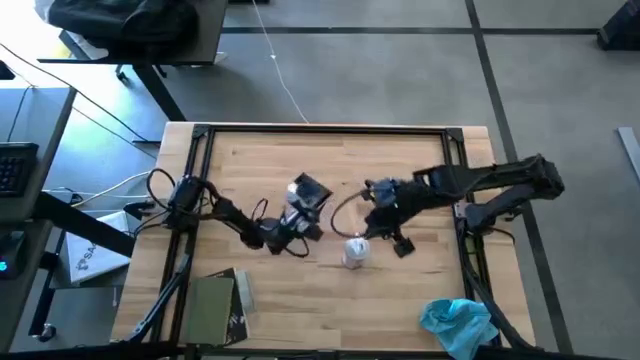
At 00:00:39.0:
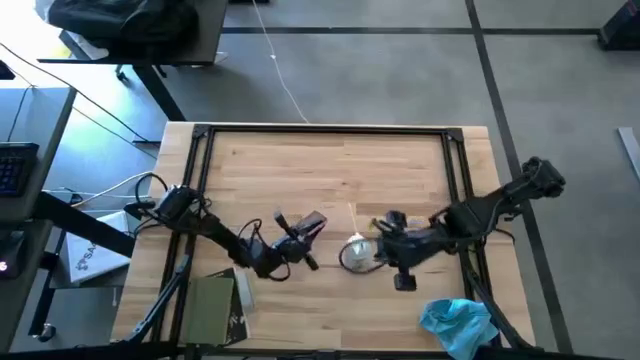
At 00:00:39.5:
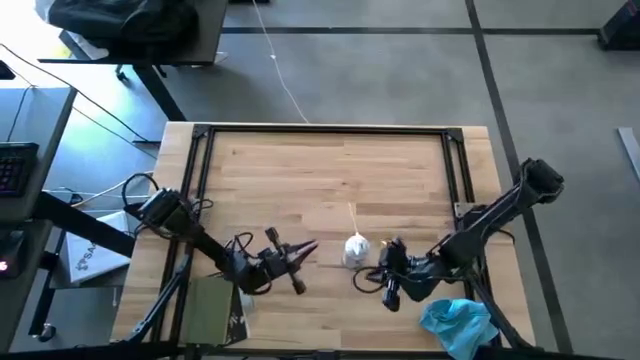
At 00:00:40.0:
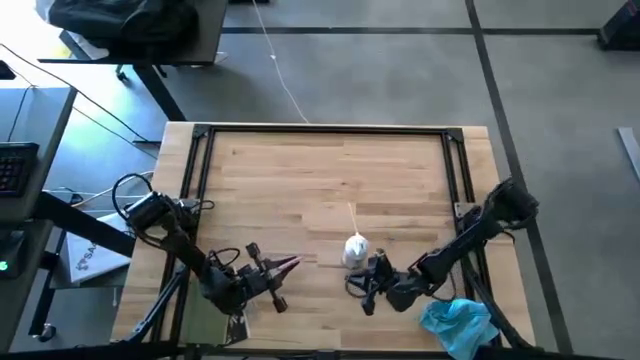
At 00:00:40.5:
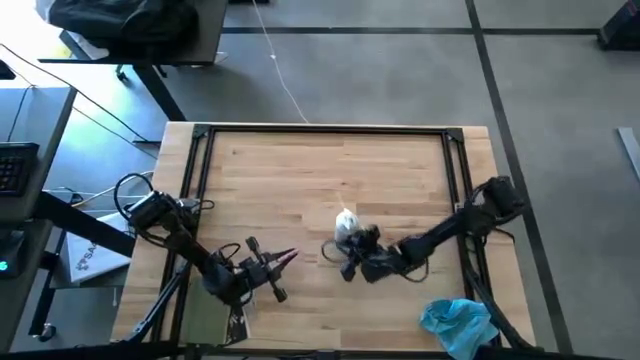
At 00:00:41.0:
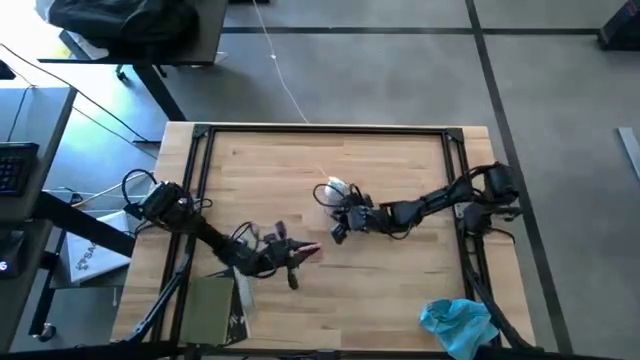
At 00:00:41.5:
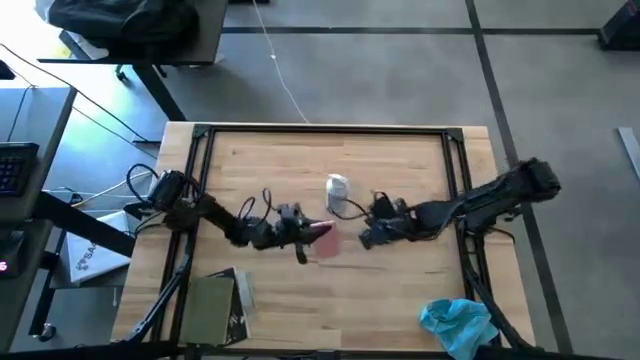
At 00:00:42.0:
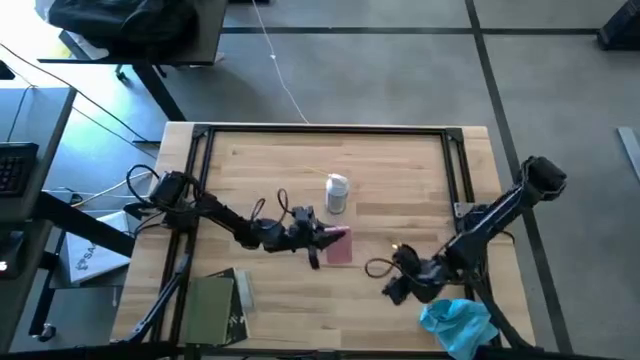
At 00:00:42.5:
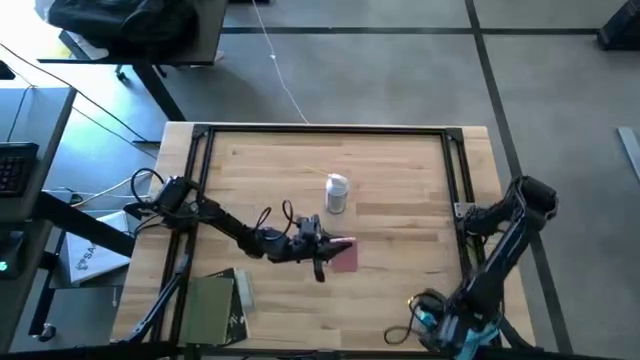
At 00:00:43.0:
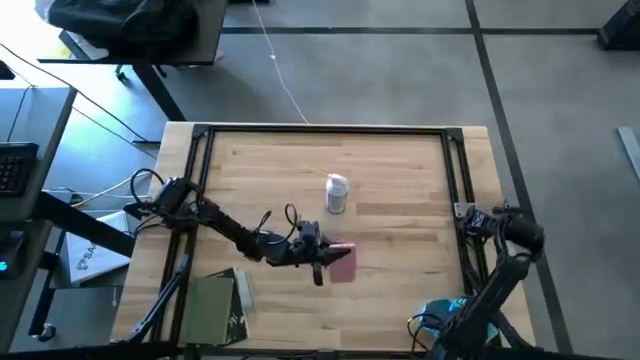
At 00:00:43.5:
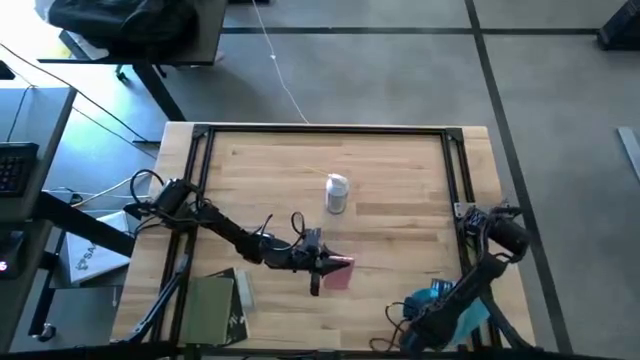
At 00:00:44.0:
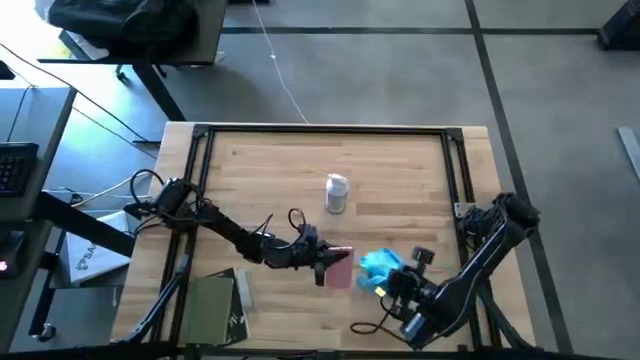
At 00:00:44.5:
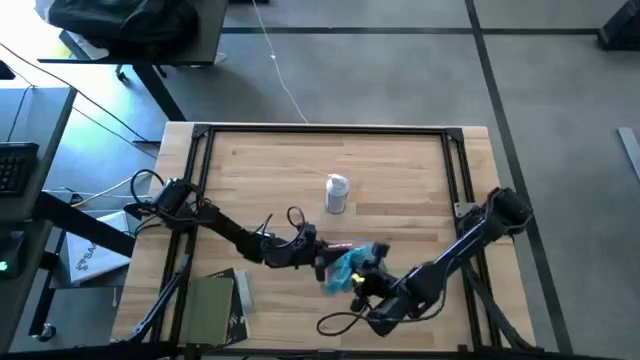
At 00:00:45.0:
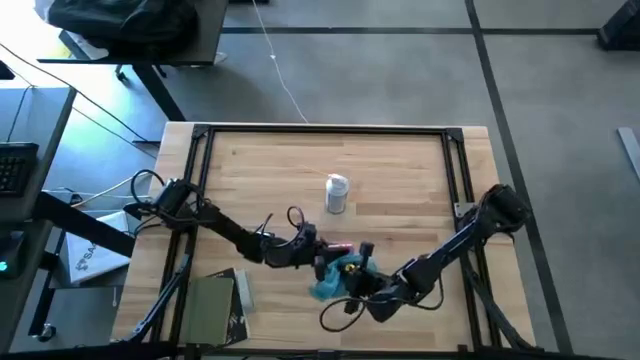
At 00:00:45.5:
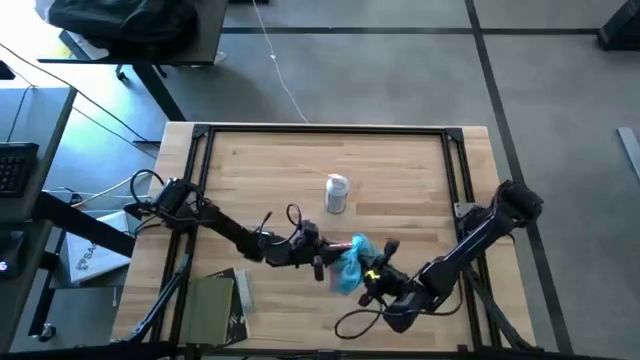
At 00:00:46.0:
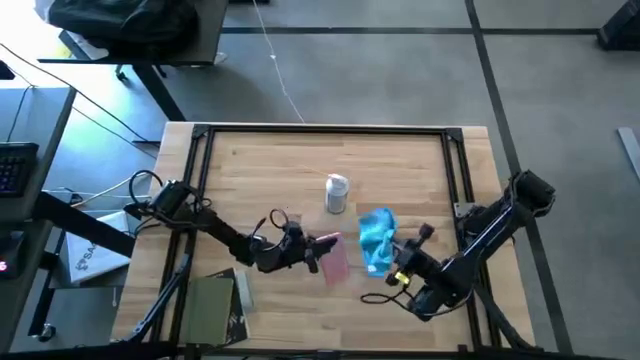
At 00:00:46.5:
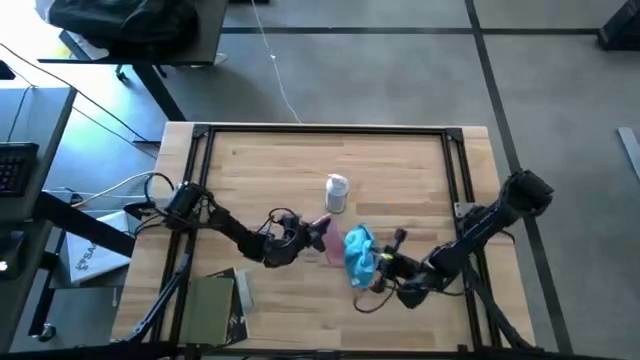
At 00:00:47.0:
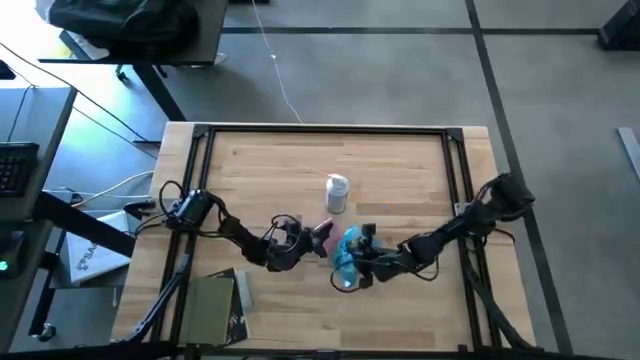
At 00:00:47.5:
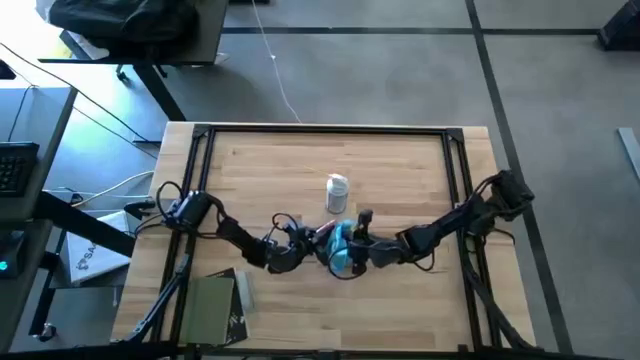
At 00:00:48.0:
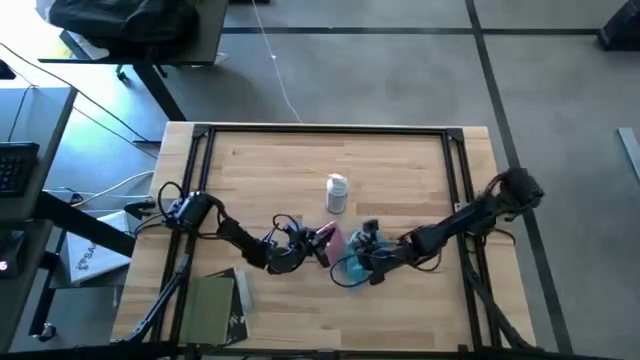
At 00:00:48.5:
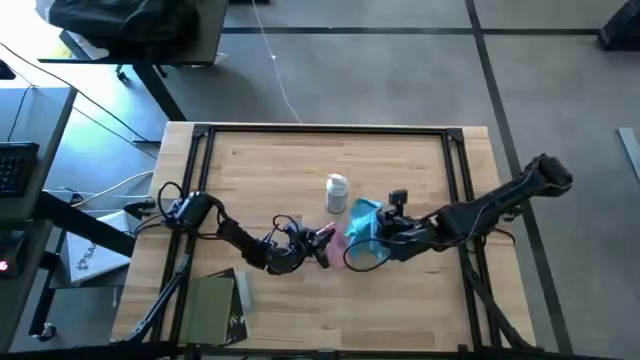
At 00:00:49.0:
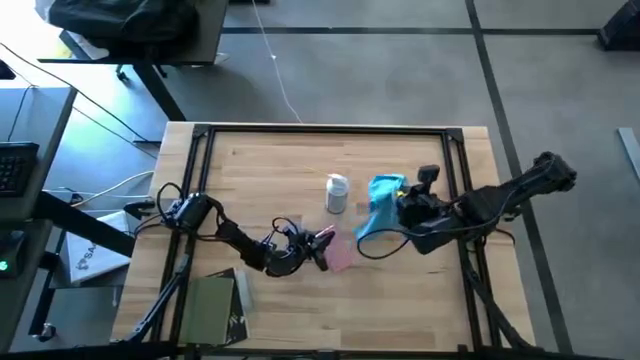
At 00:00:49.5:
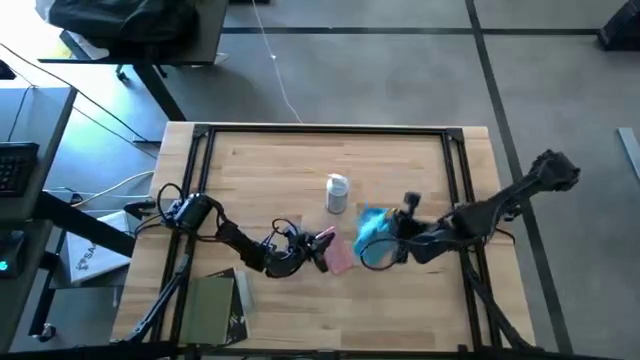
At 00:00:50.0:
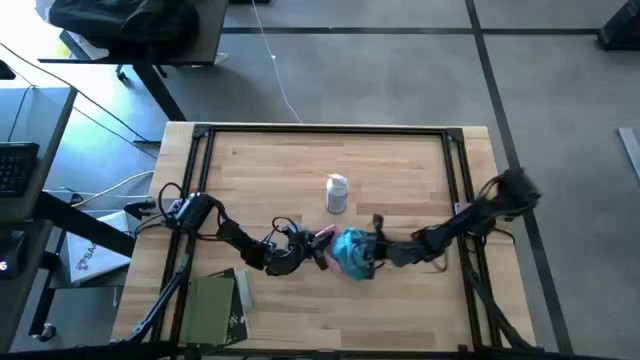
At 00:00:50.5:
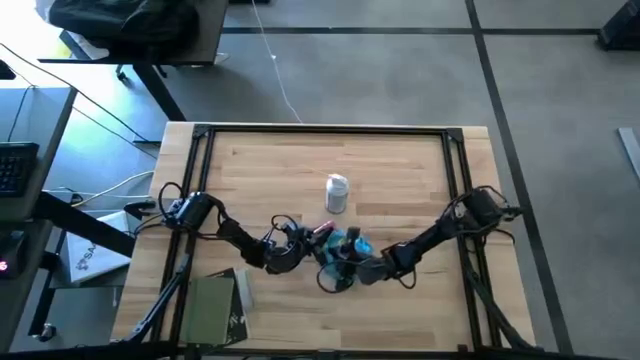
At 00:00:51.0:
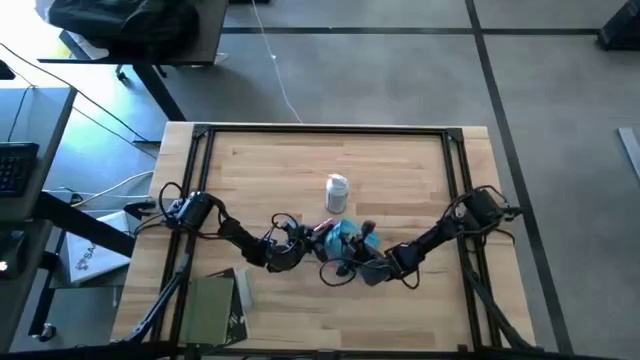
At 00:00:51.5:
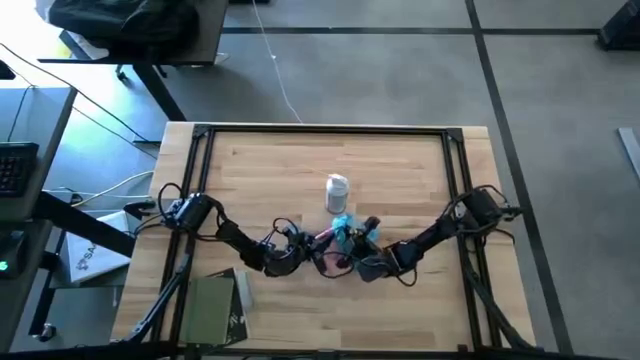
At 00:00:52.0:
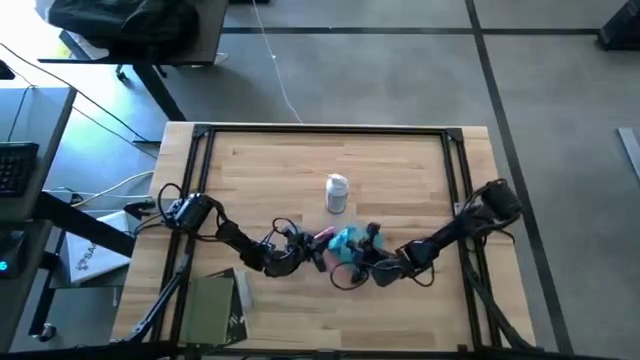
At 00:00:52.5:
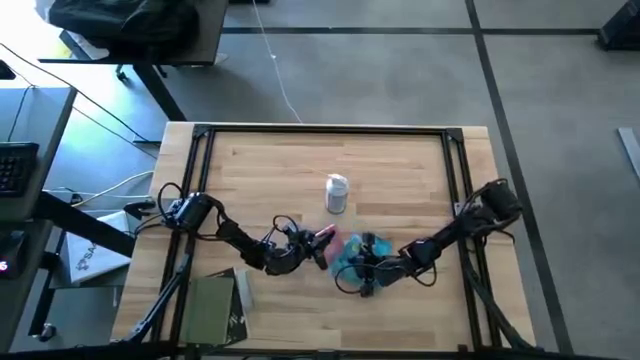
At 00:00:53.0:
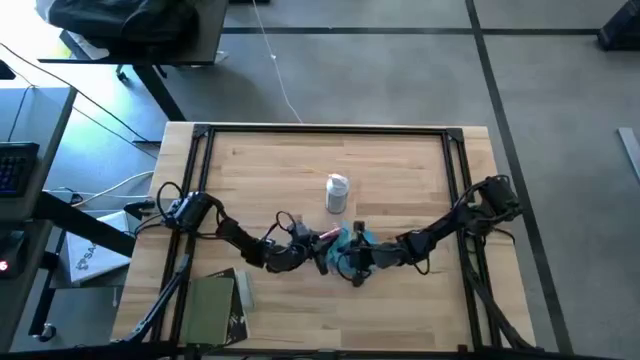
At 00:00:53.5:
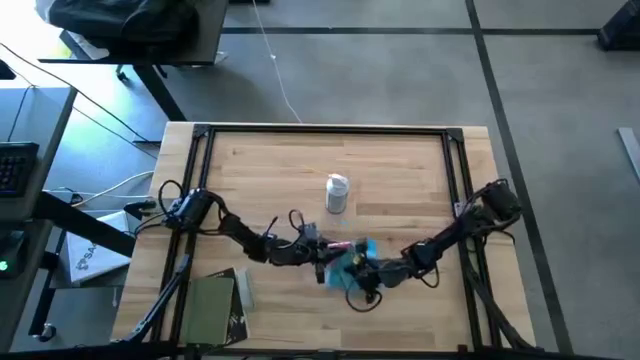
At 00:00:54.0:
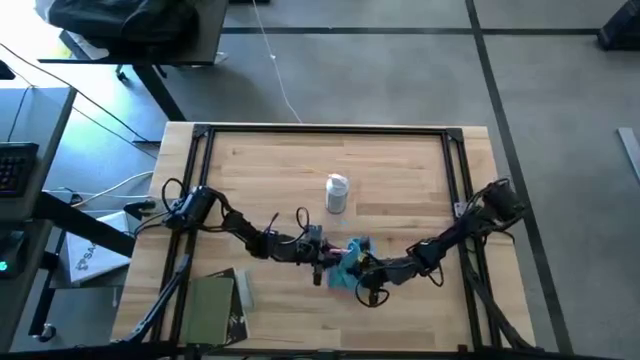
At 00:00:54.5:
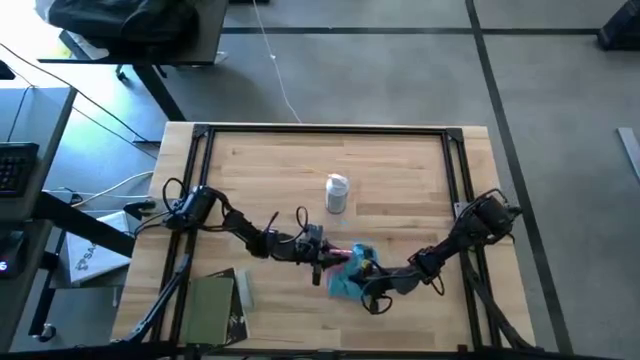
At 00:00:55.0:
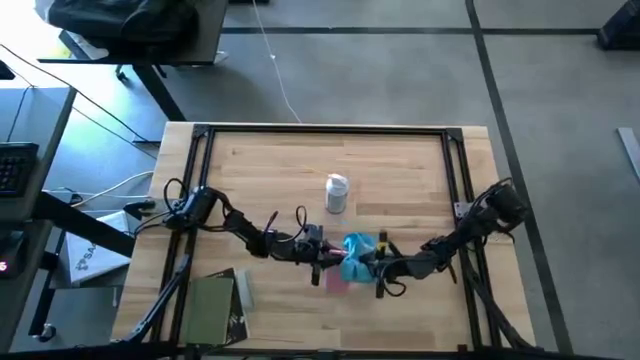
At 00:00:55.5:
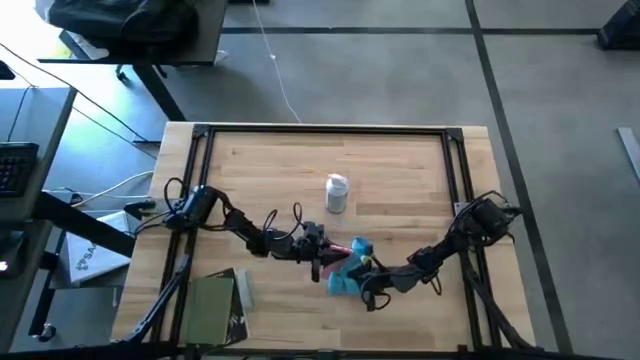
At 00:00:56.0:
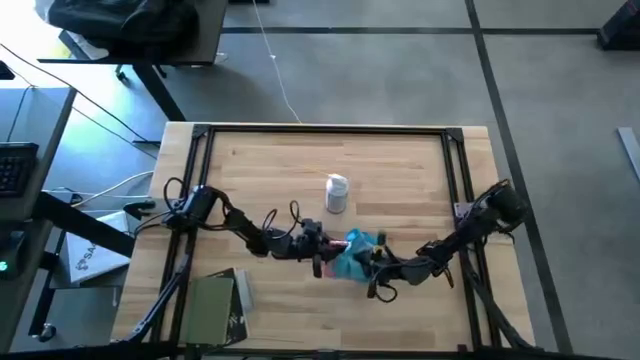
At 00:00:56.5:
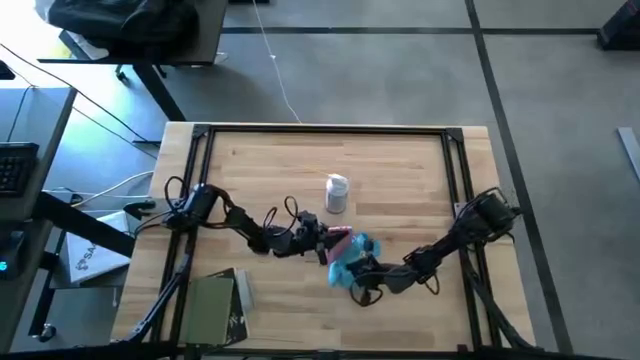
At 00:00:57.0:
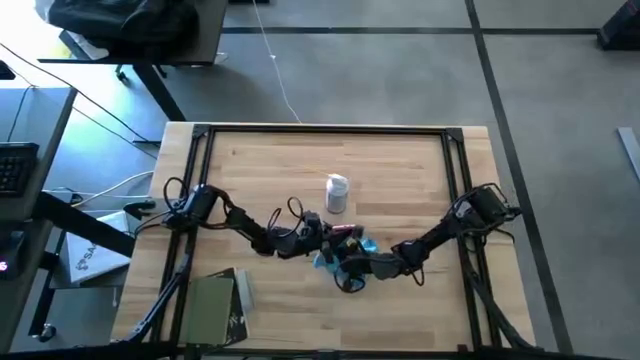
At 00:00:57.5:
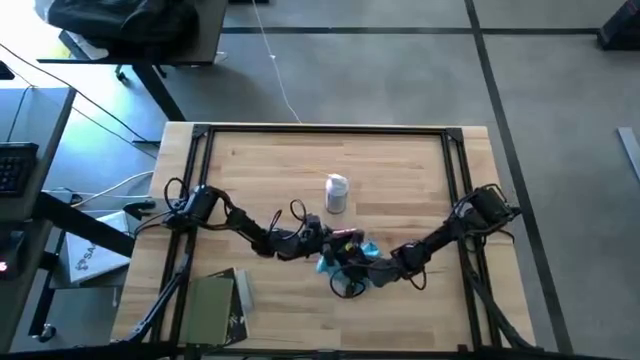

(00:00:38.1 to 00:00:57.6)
Task: Apply microfiber cloth
Wipe the pink cellphone with a blue microfiber cloth
